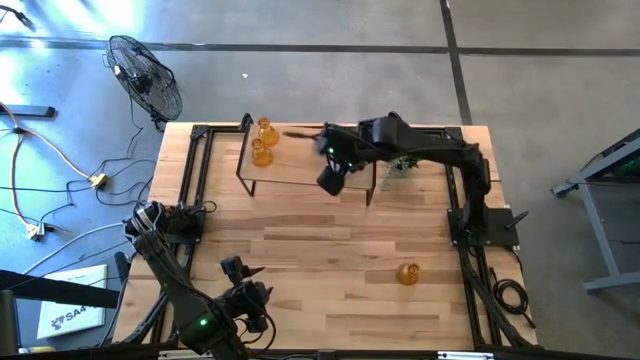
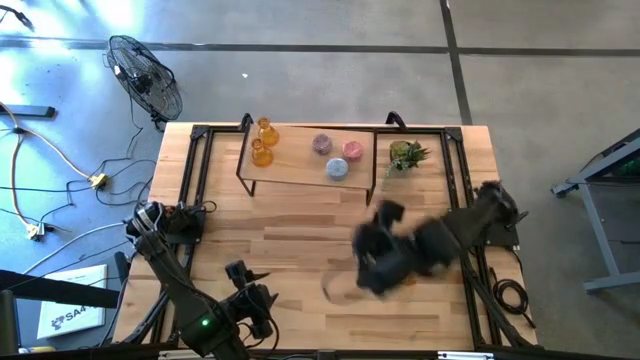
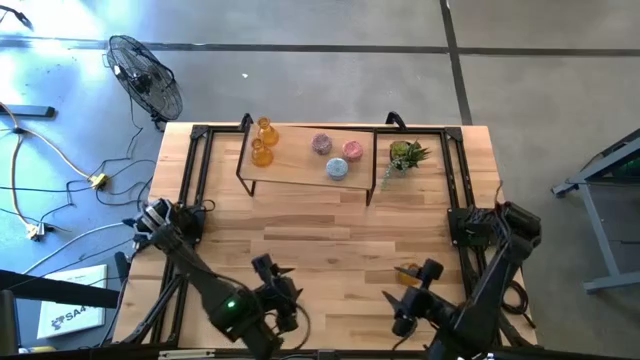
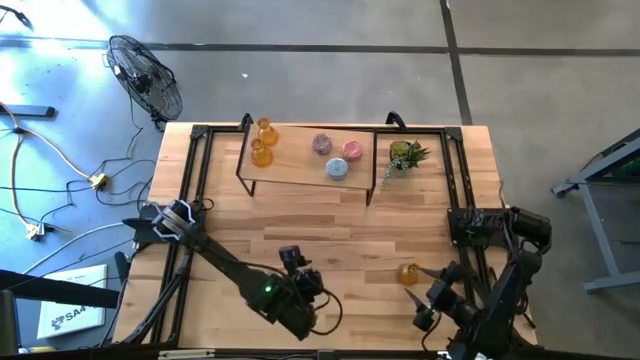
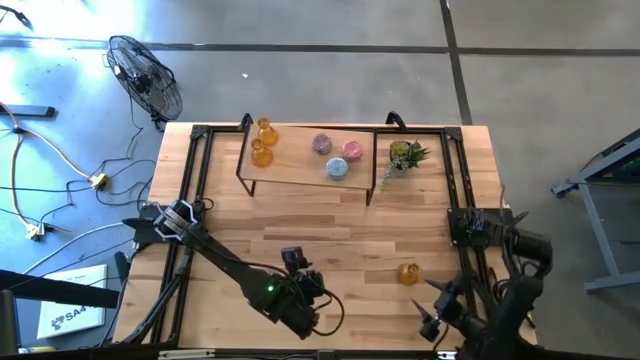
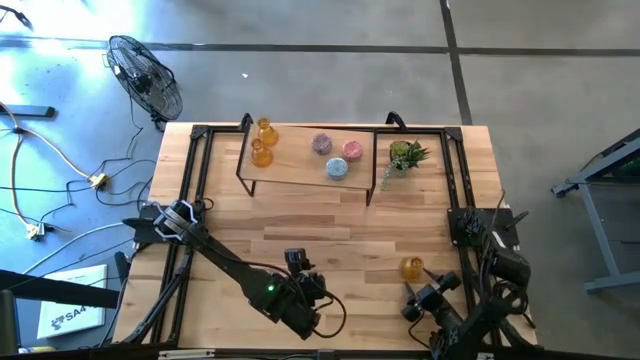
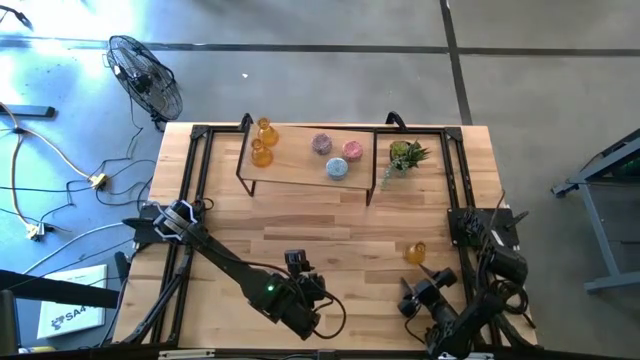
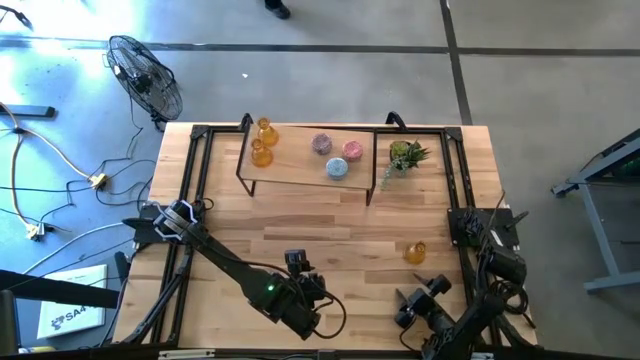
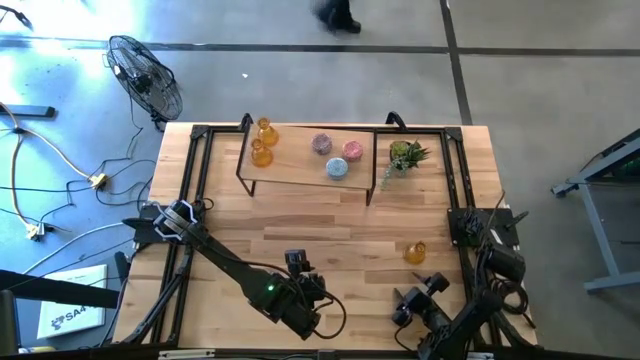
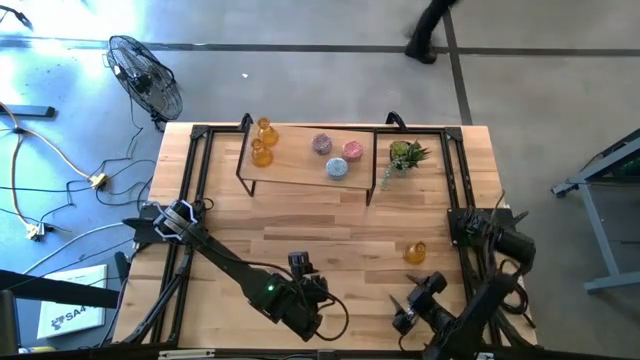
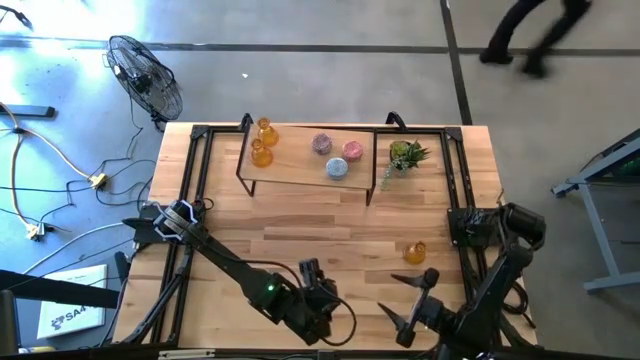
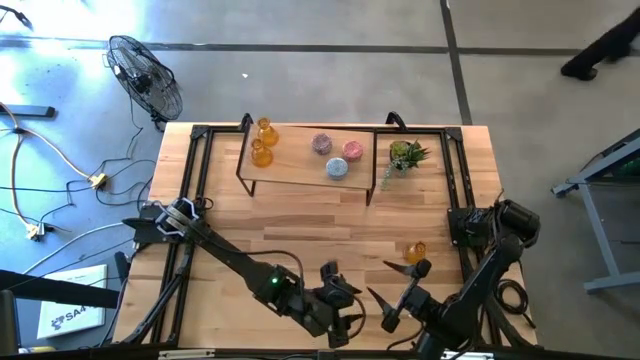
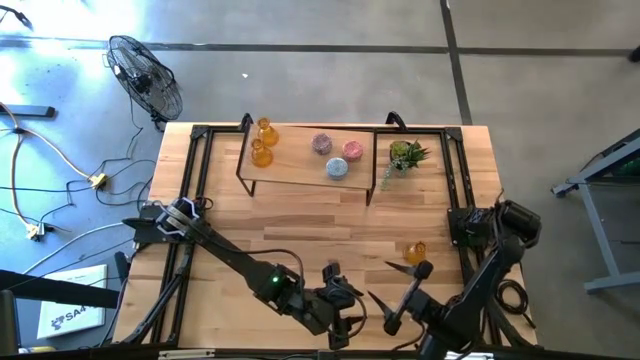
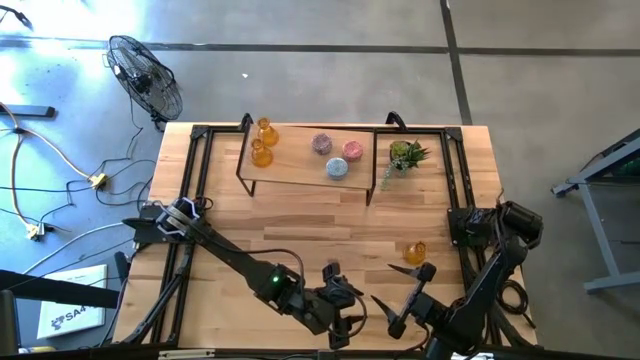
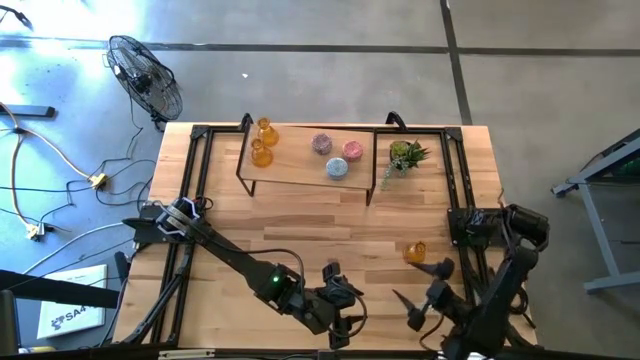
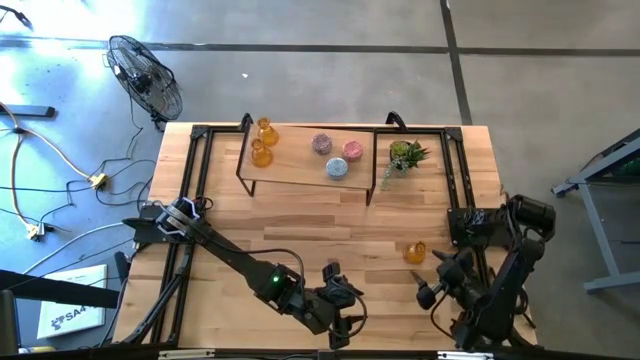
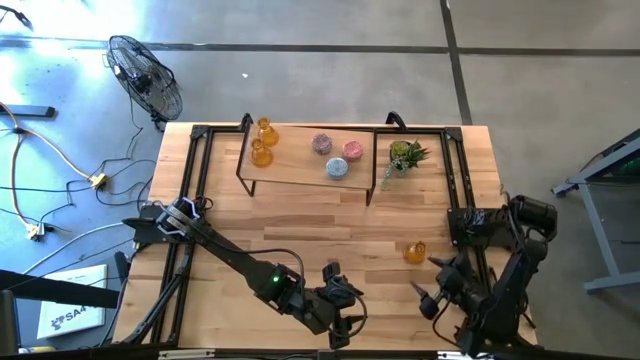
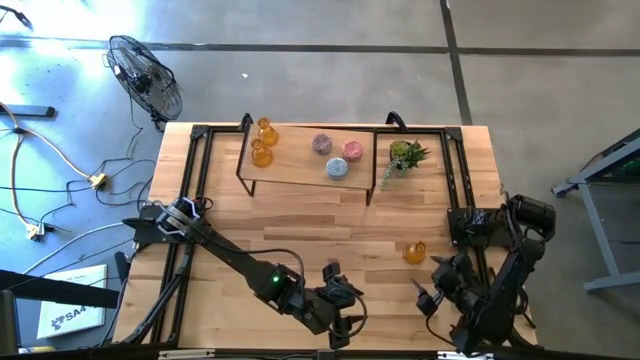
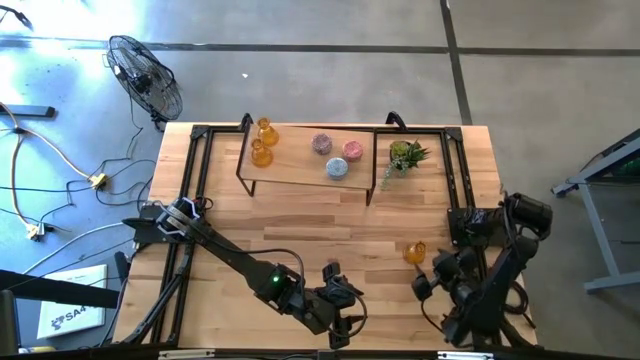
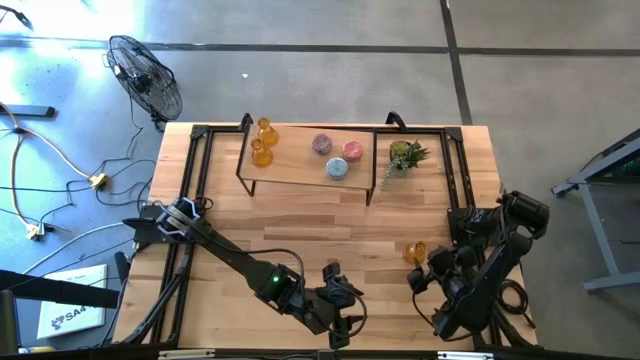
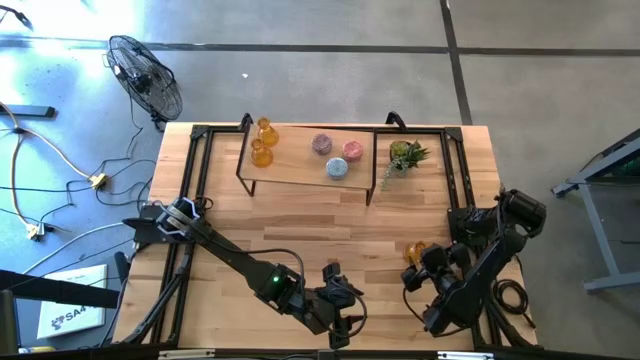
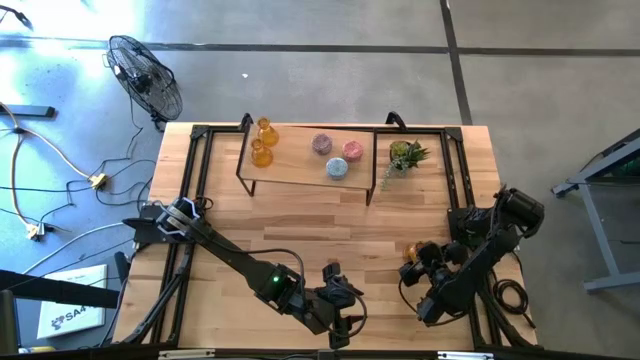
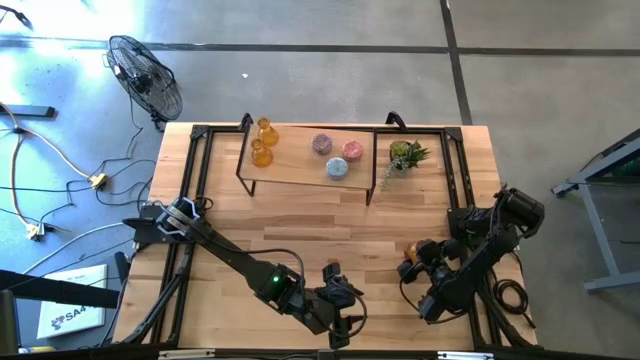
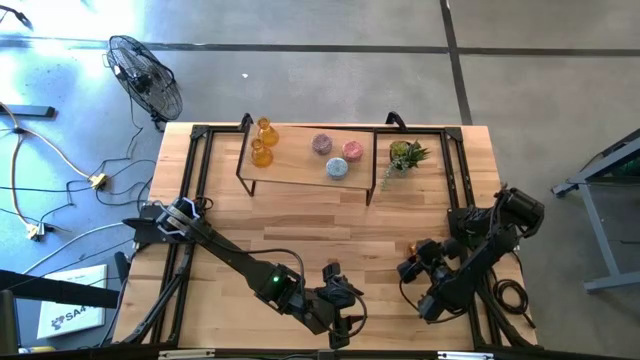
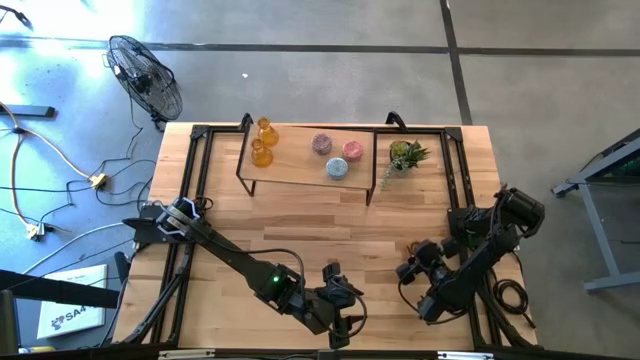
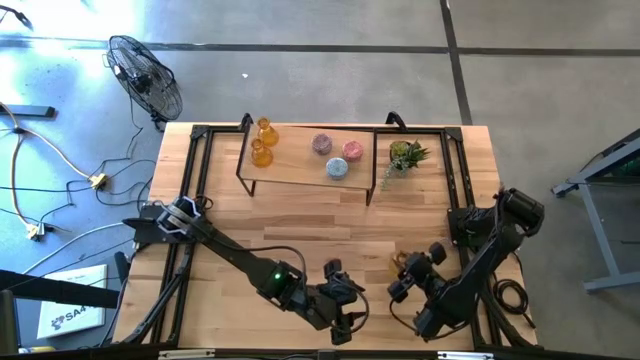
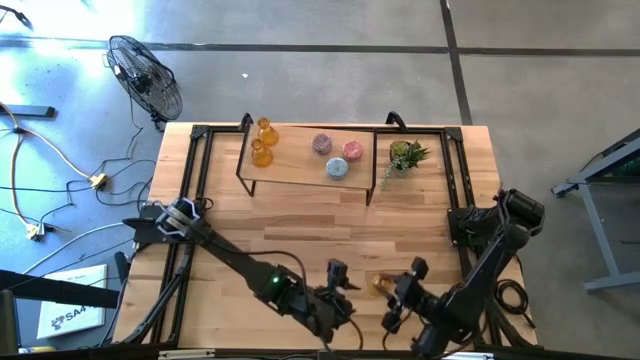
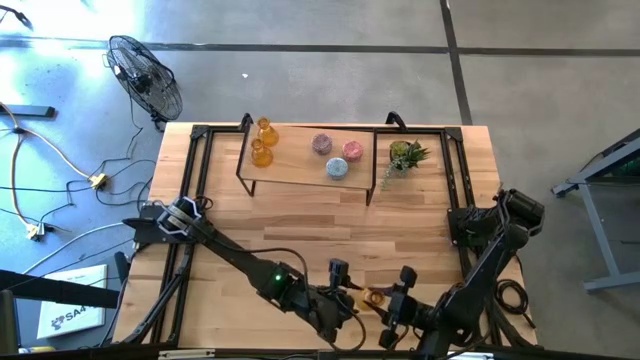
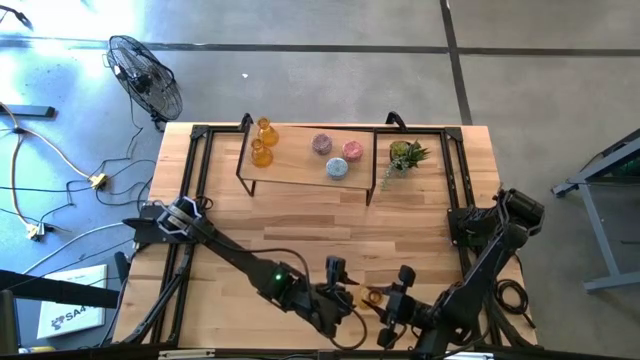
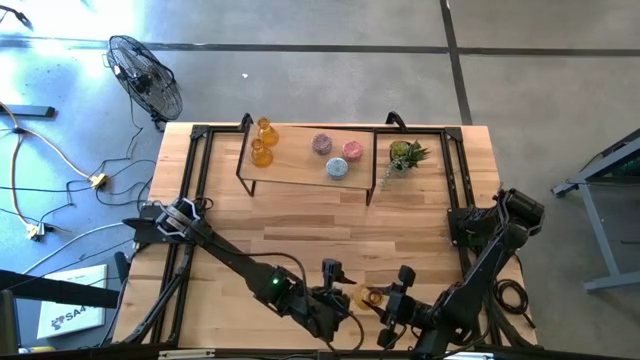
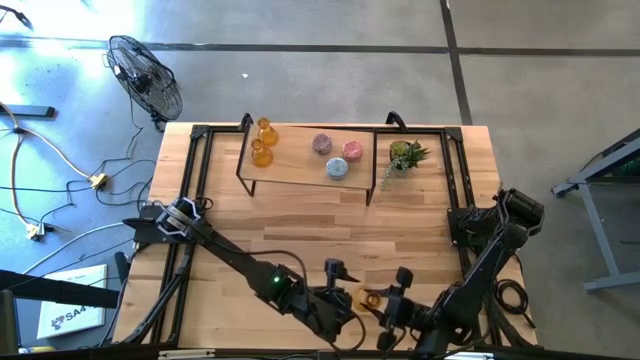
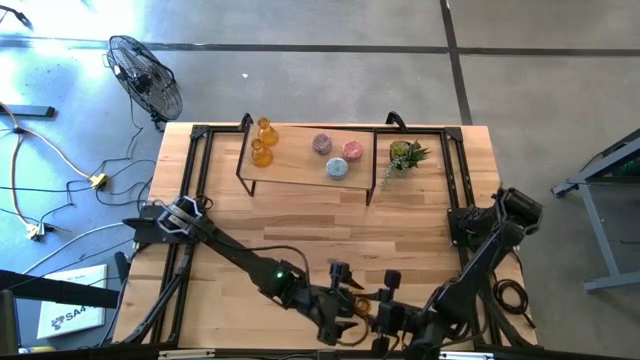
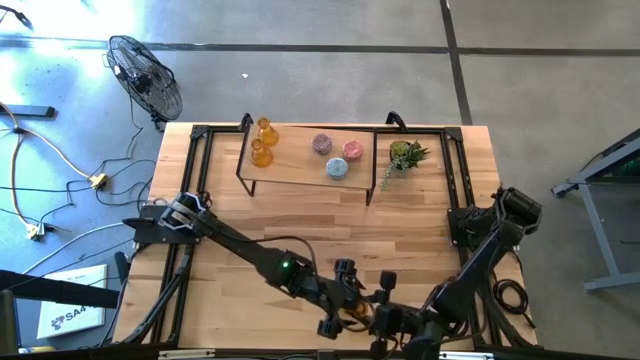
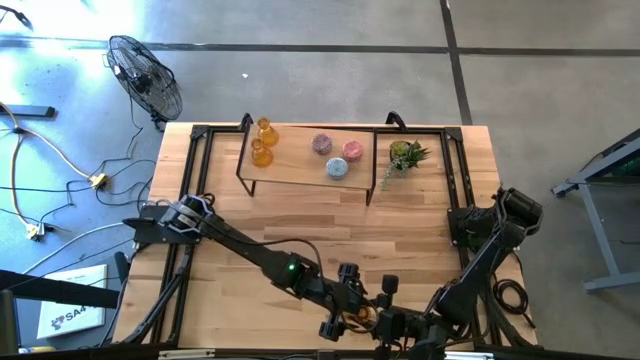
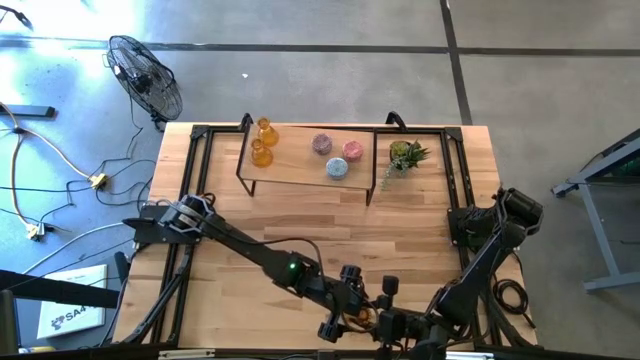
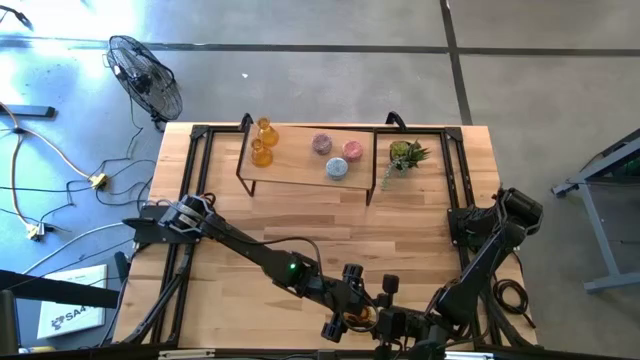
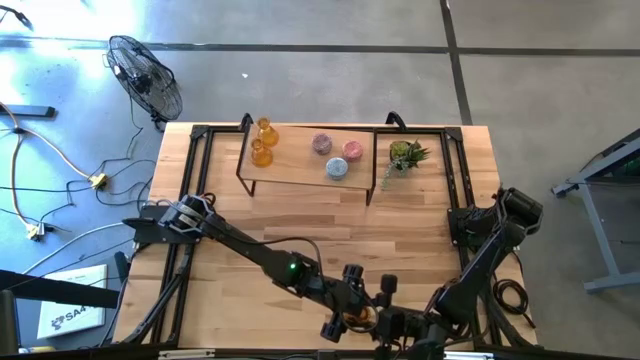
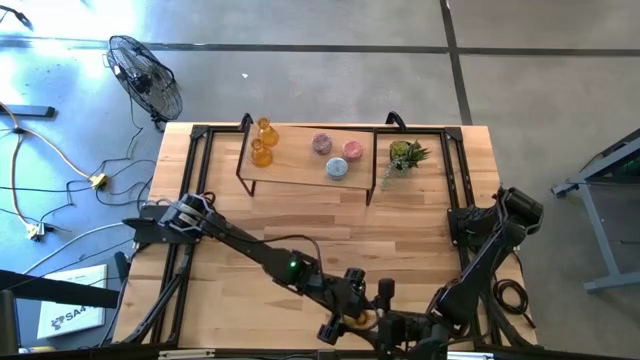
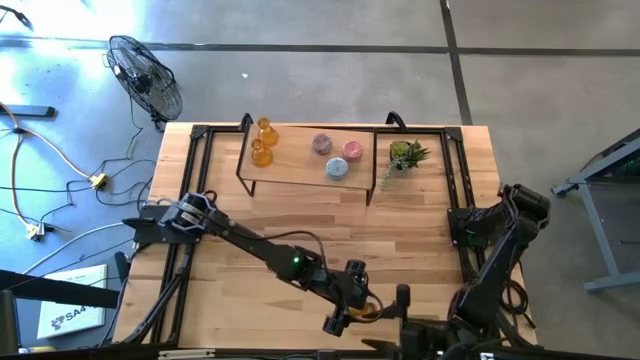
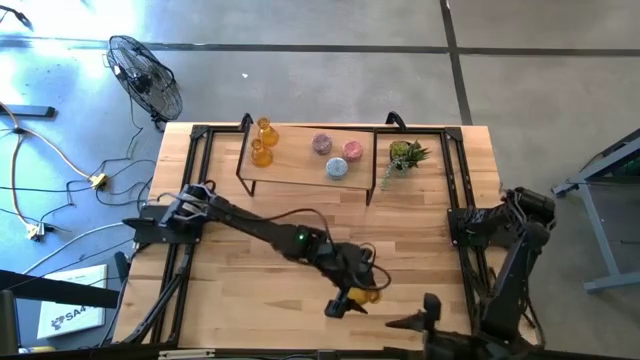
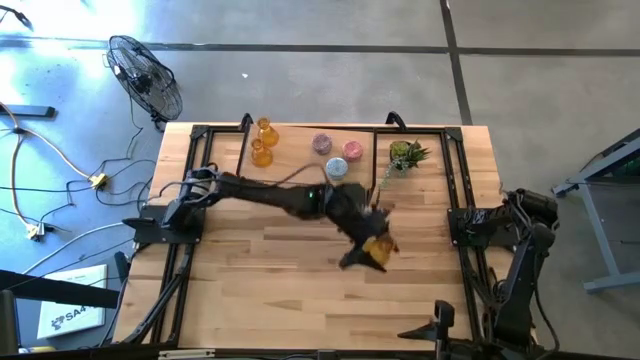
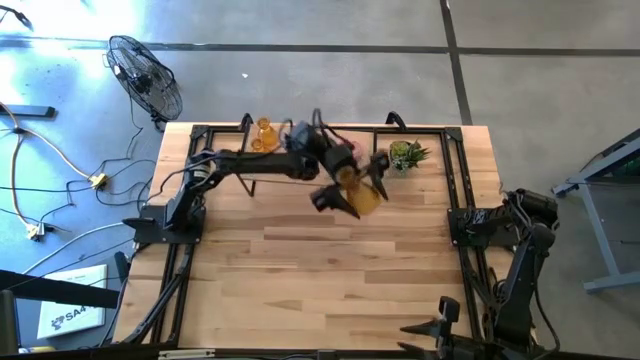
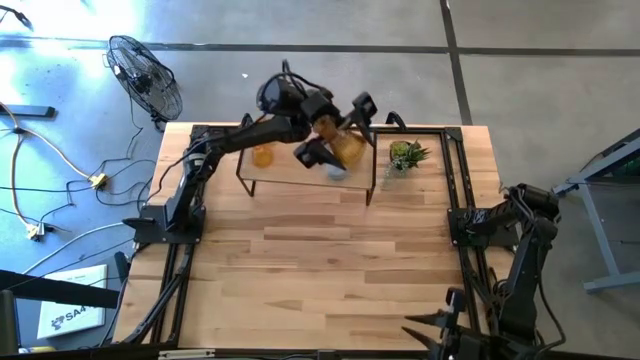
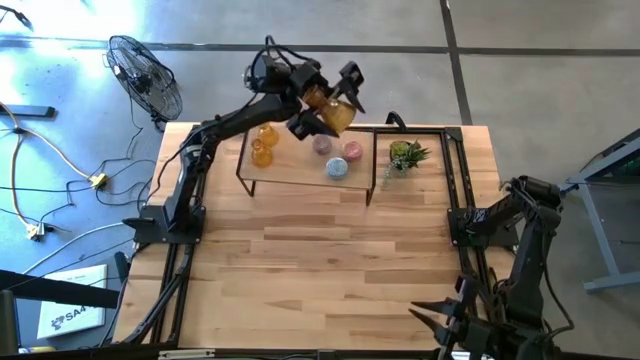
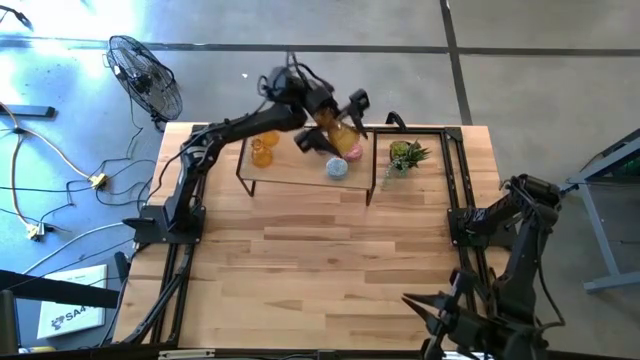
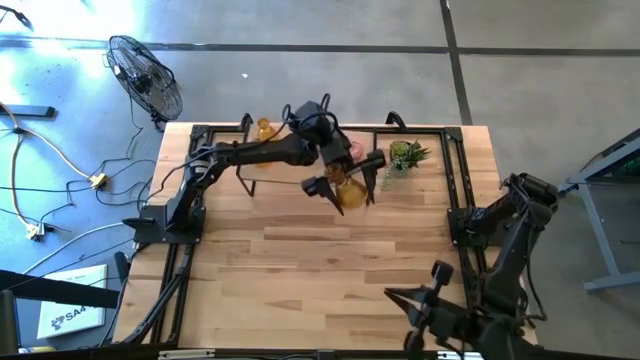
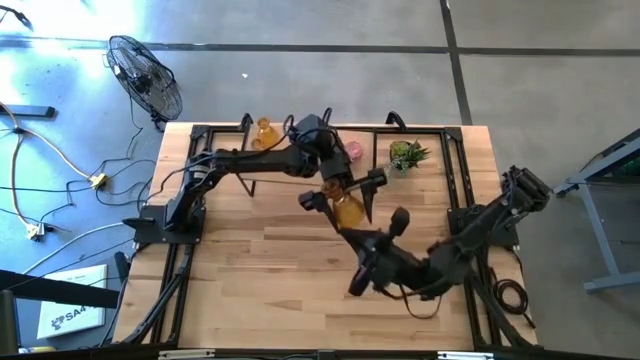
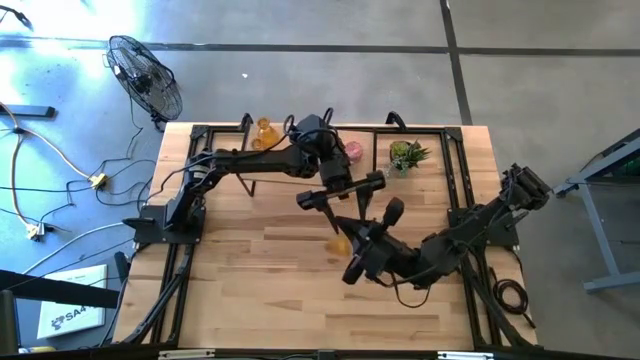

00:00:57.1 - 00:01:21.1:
Task: Pick & Place candle stick holders
Put the yellow glass candle holder on the shelf
